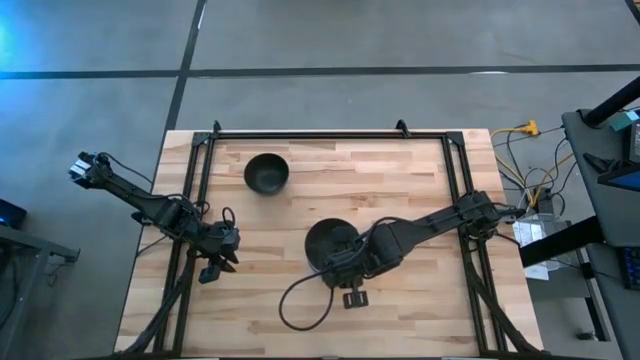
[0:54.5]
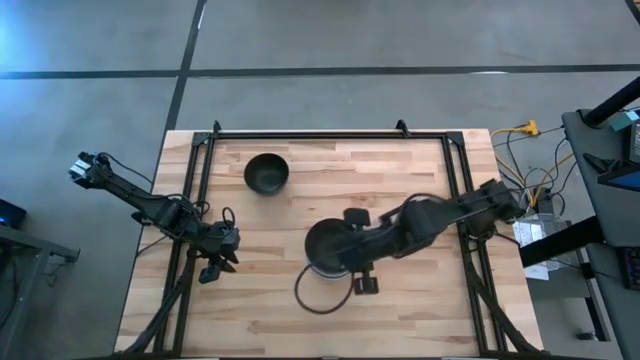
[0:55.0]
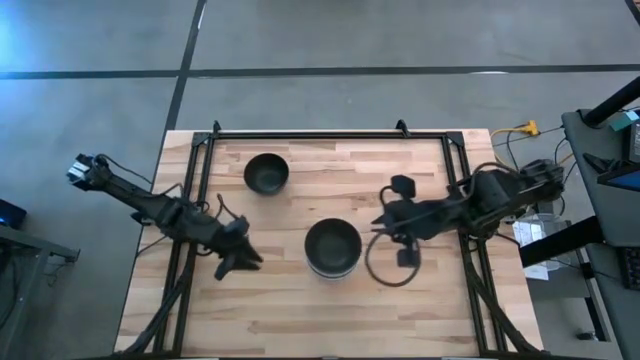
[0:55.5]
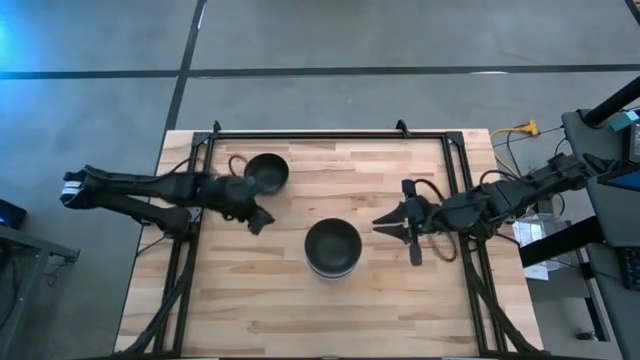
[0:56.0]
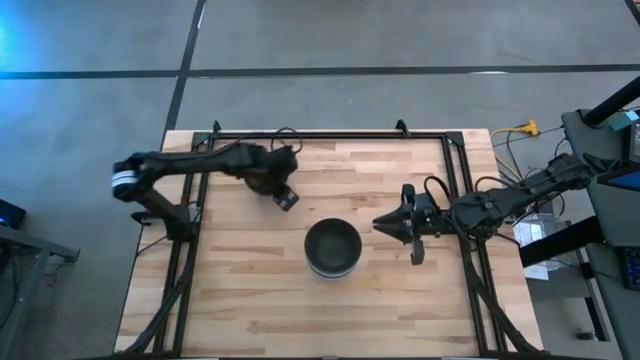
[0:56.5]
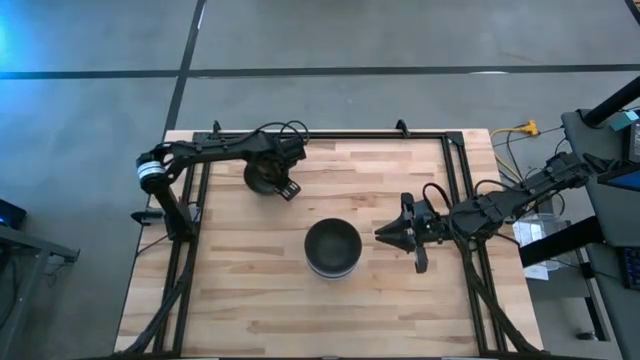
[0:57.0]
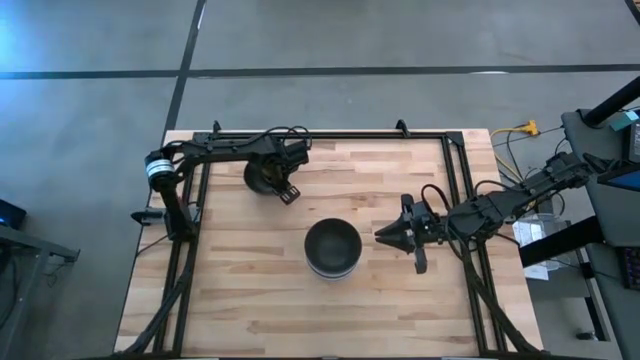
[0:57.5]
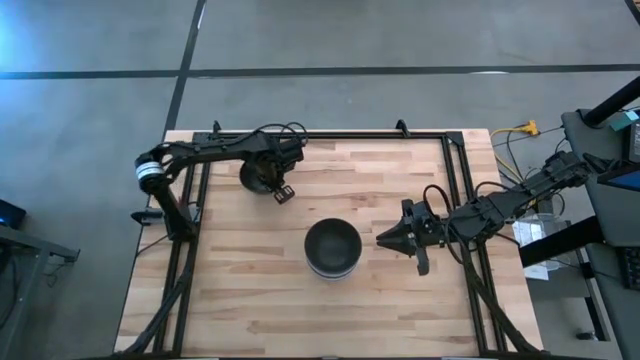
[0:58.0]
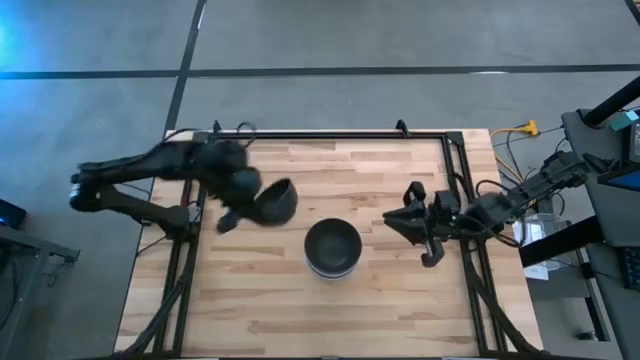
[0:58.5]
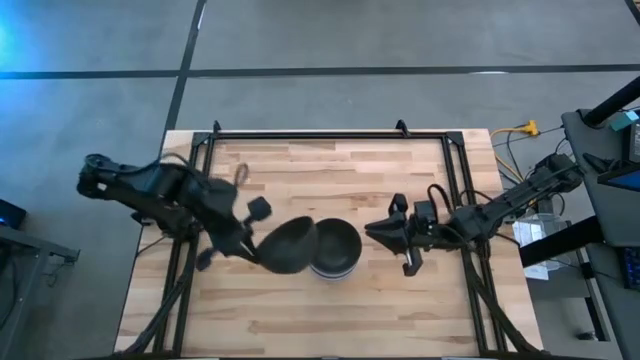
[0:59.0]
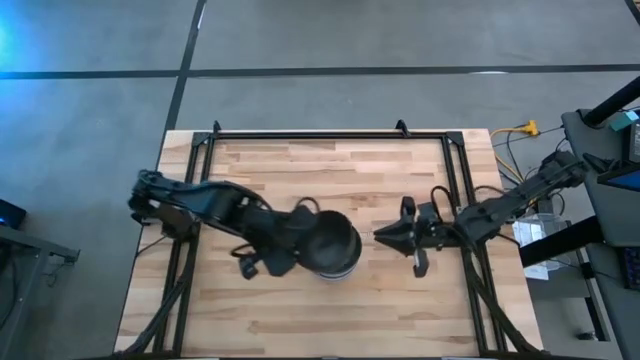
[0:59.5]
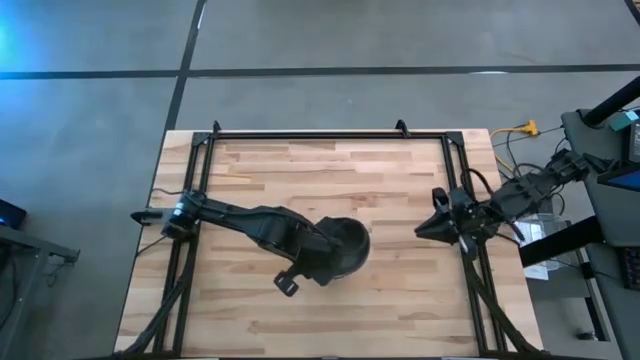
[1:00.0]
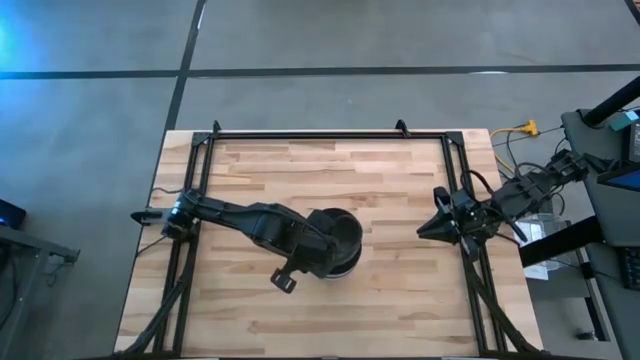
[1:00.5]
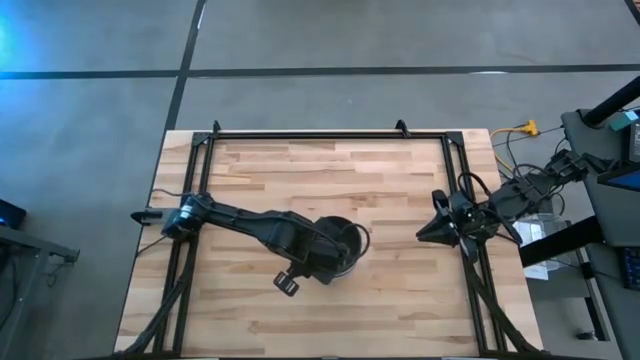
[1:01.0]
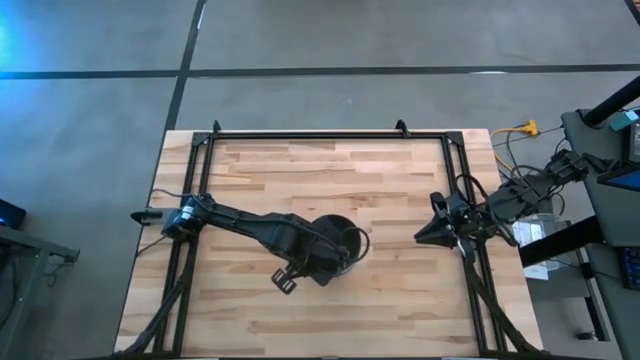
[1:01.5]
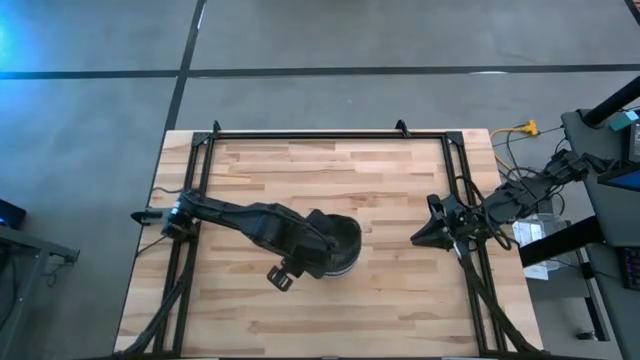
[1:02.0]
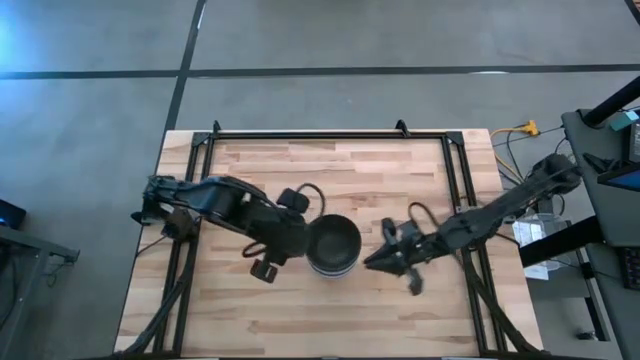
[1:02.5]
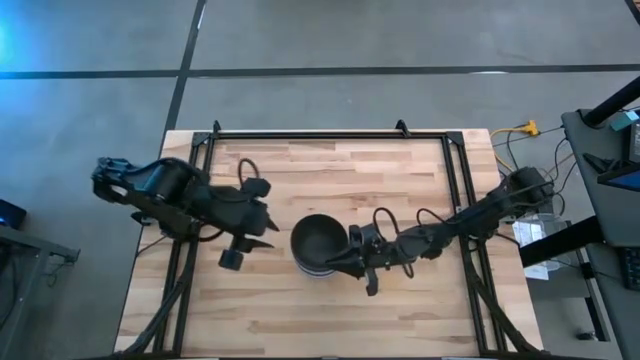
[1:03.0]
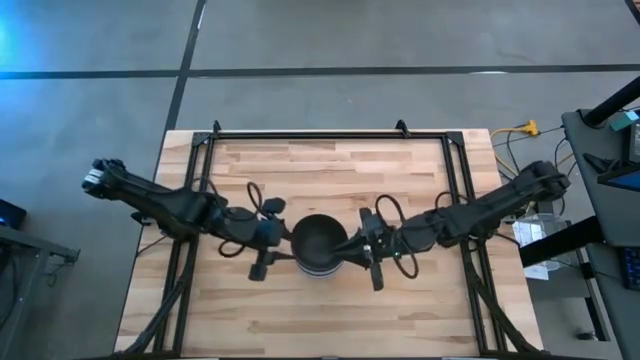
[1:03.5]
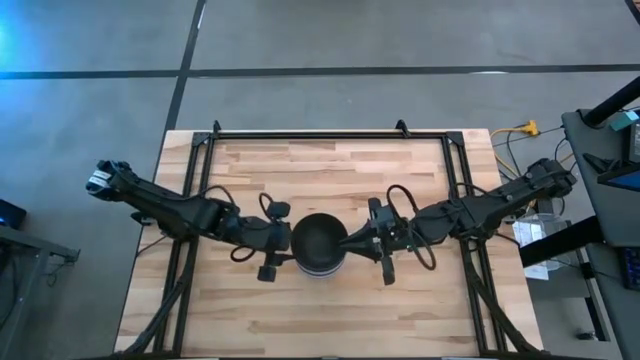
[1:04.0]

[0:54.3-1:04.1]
Task: Nest bowls inside each other
Stack the black bowl on top of the black bowl

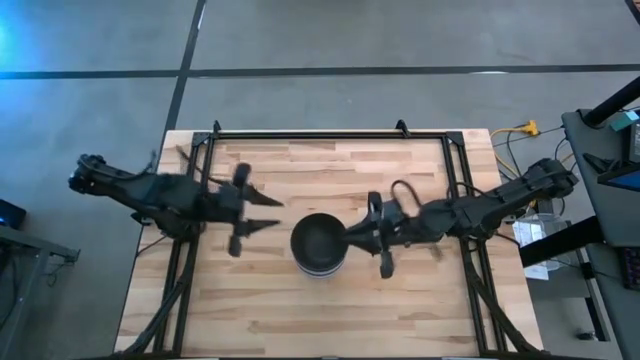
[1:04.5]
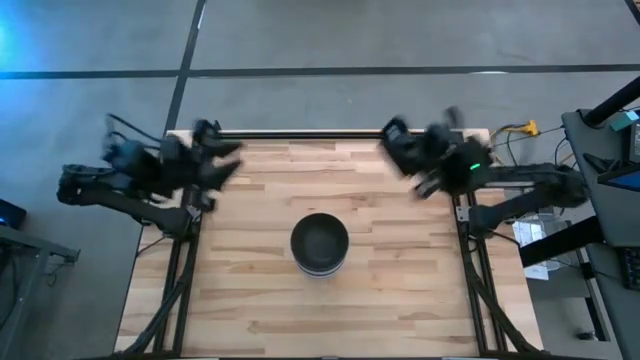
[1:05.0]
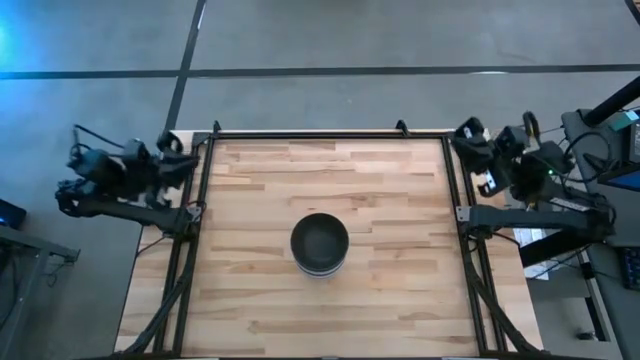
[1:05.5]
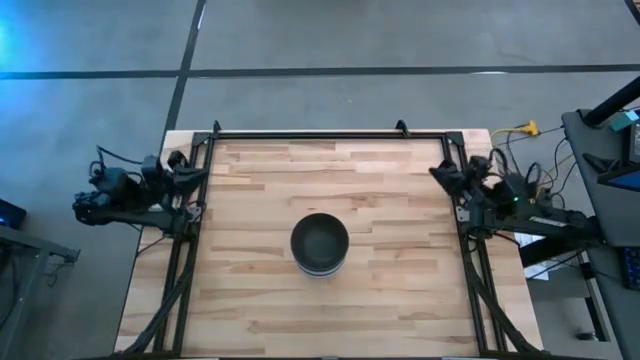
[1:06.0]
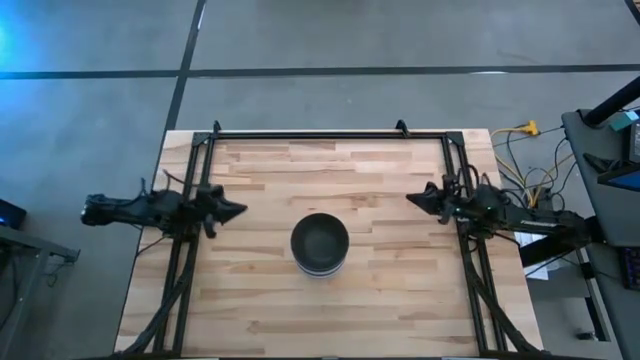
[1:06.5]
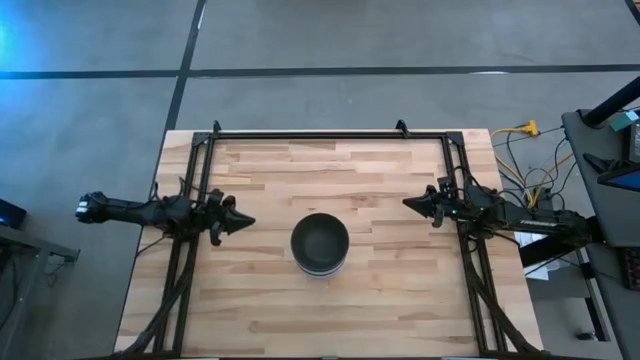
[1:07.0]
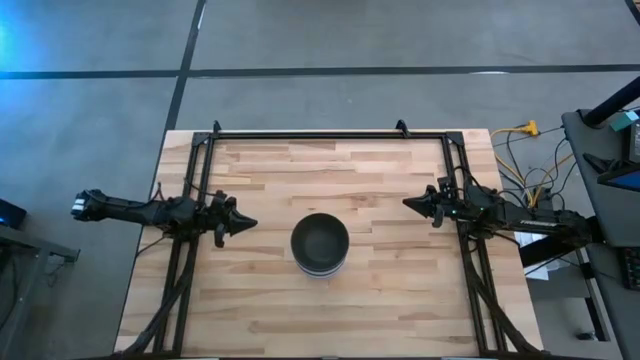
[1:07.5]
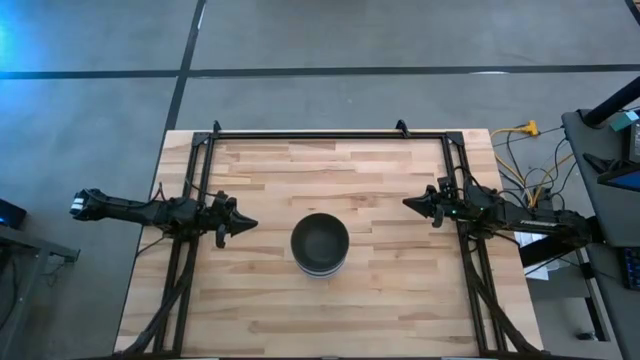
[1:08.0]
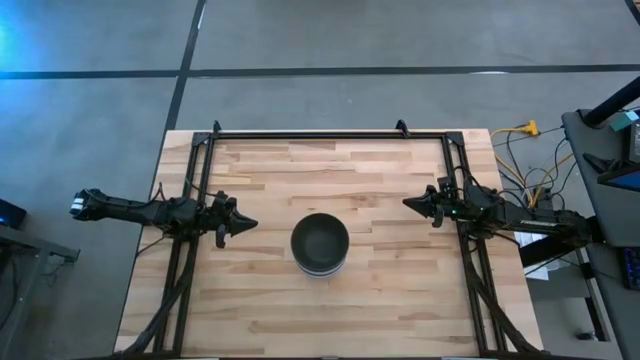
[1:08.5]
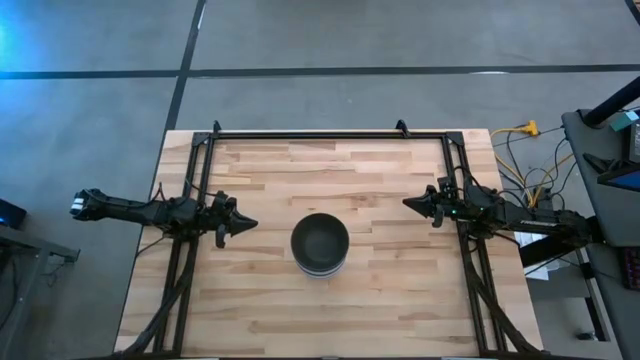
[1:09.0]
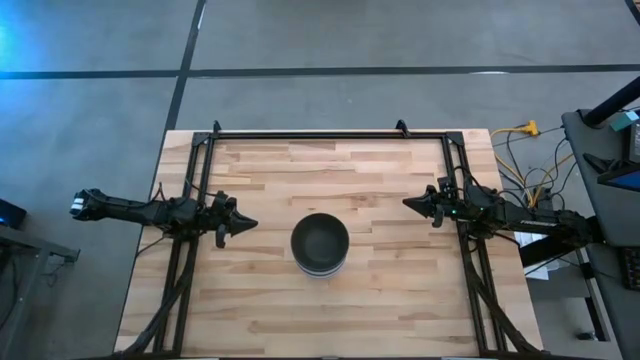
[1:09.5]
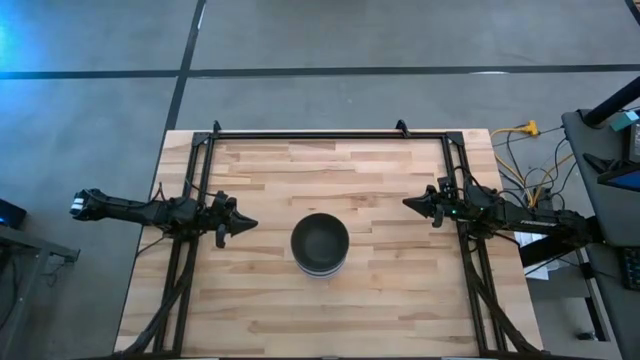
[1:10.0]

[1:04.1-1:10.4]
Return to Home Position

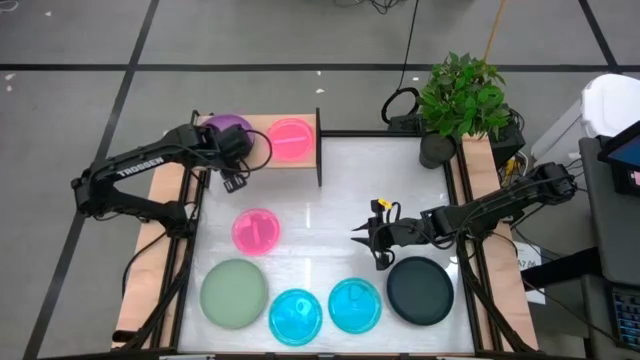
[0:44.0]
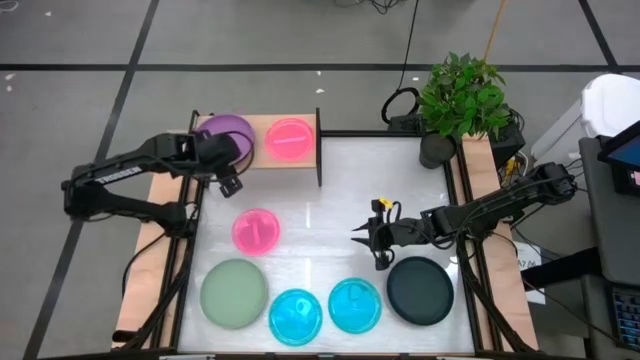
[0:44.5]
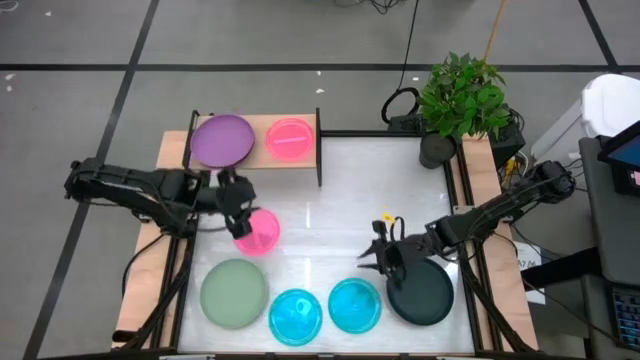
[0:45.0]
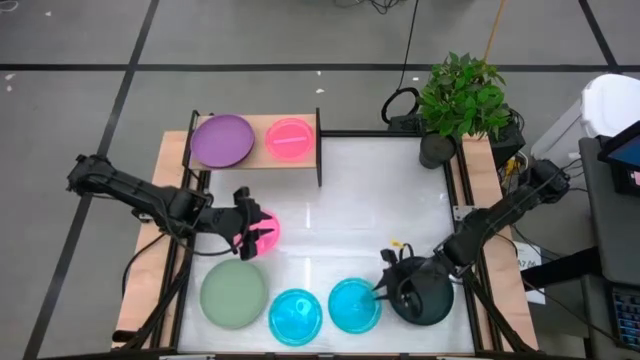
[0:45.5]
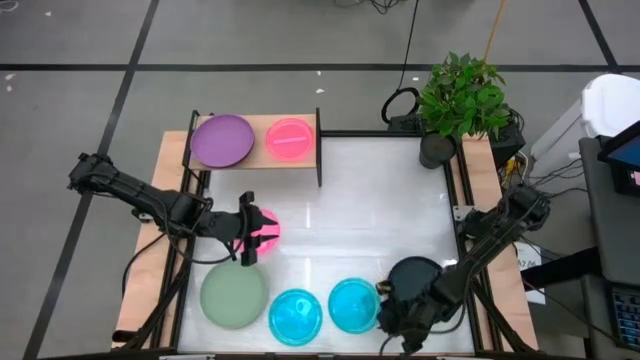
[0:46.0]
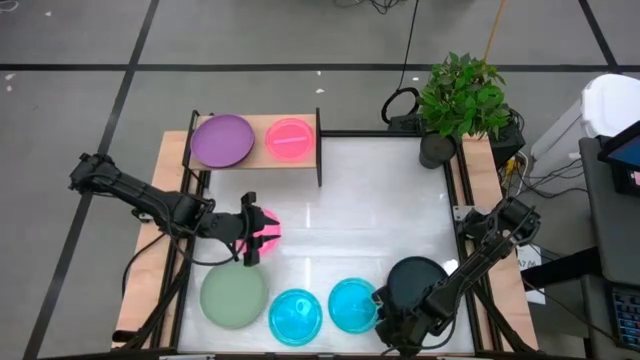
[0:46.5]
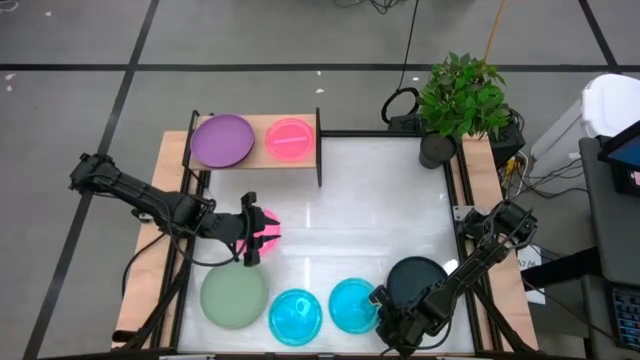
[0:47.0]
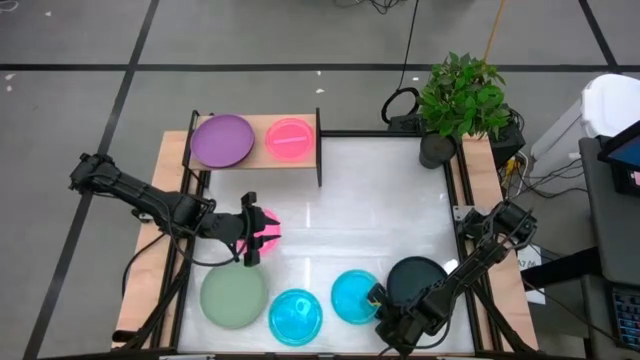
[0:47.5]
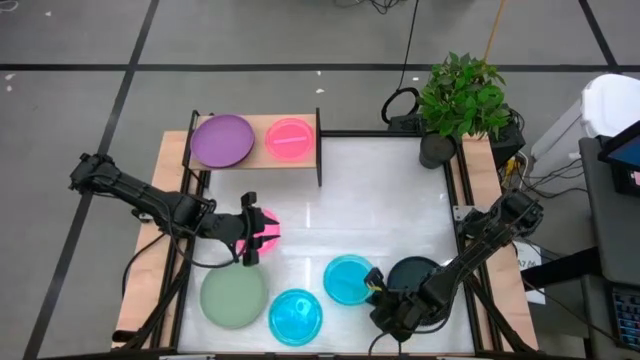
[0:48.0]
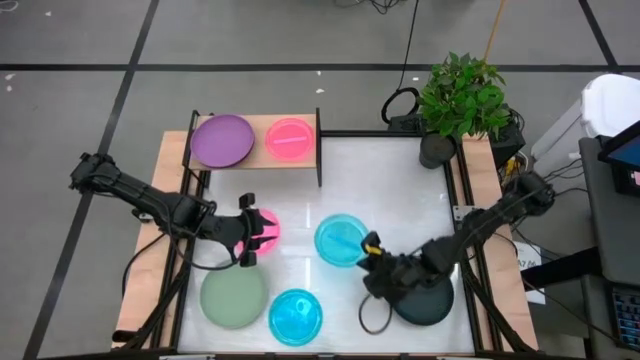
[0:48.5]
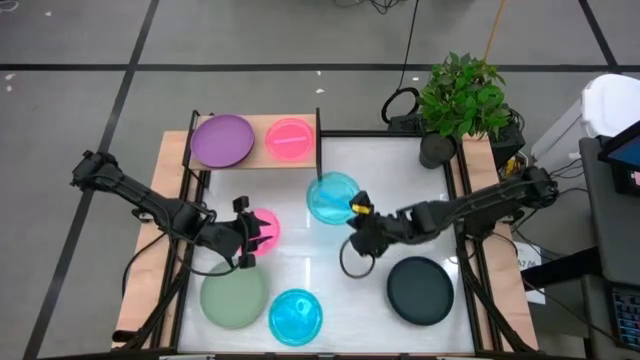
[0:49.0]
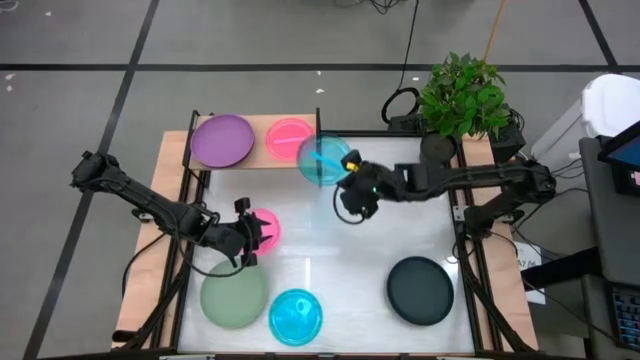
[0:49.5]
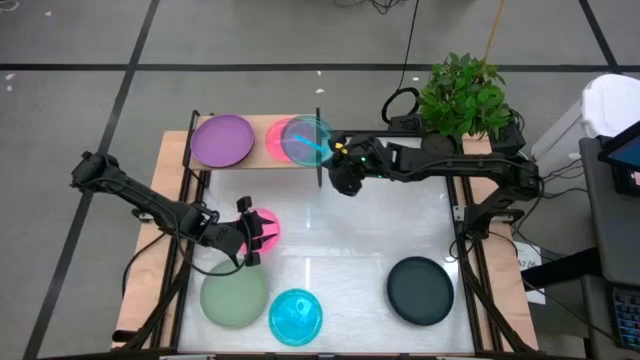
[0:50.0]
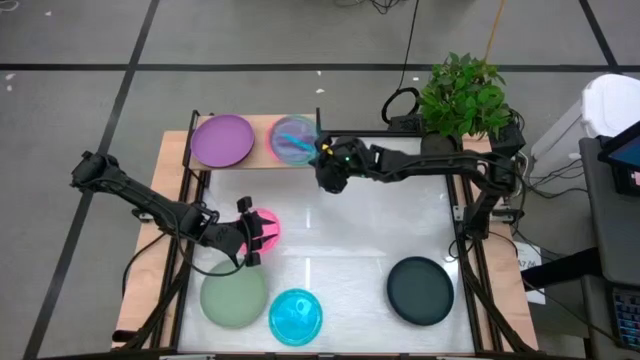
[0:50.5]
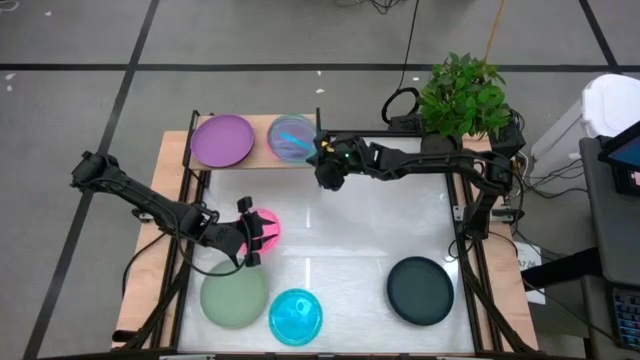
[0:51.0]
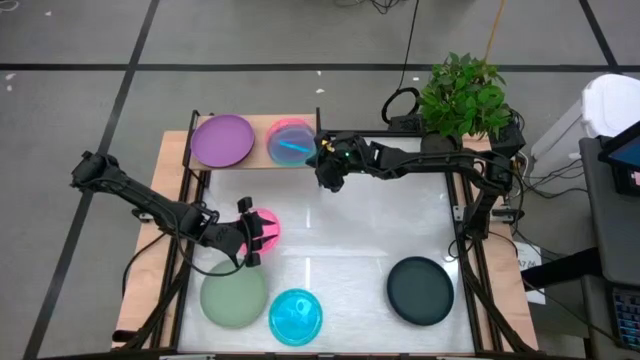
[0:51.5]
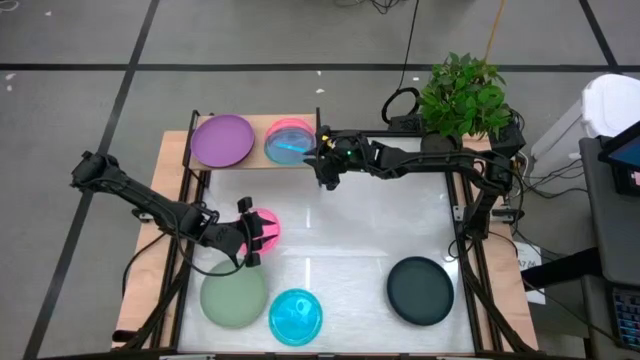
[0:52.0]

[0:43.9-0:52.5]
Task: Place and stack plates onto a shelf
Stack the right blue transparent plate on top of the pink transparent plate on the shelf
